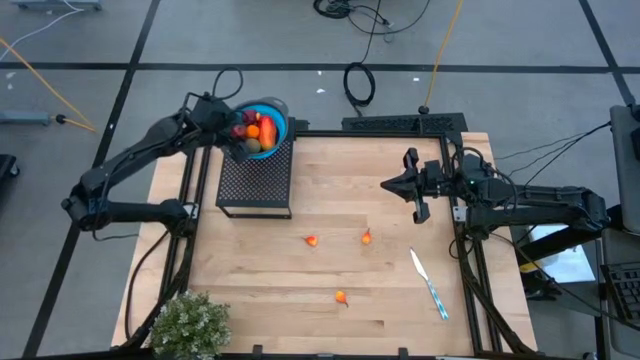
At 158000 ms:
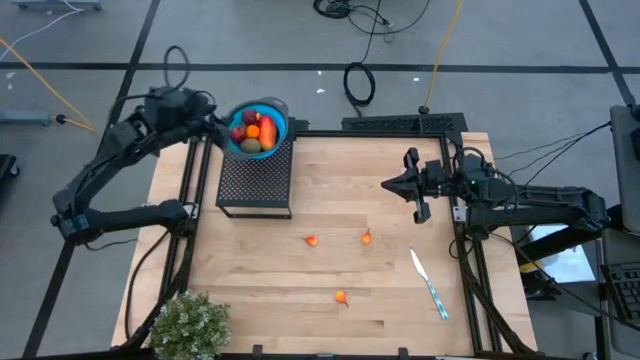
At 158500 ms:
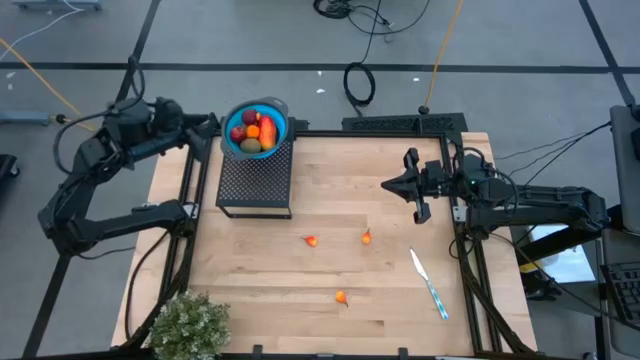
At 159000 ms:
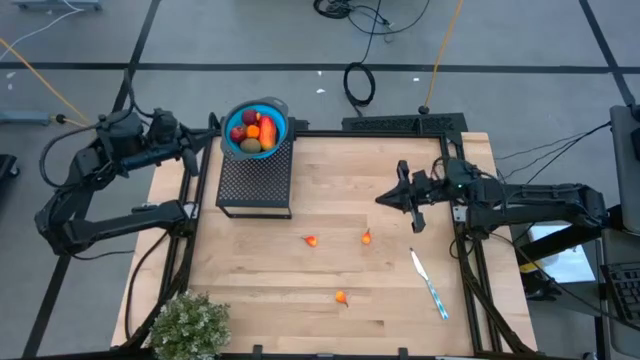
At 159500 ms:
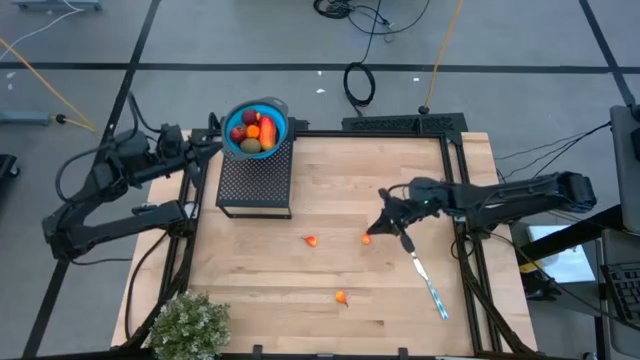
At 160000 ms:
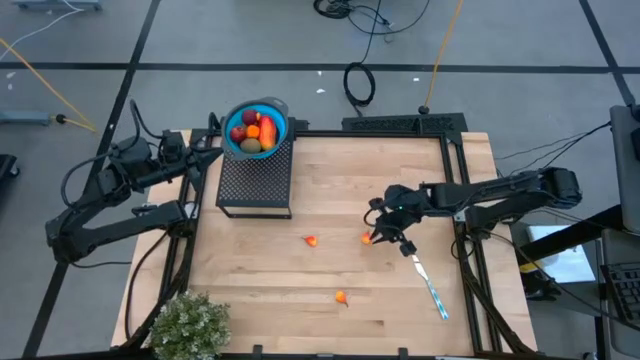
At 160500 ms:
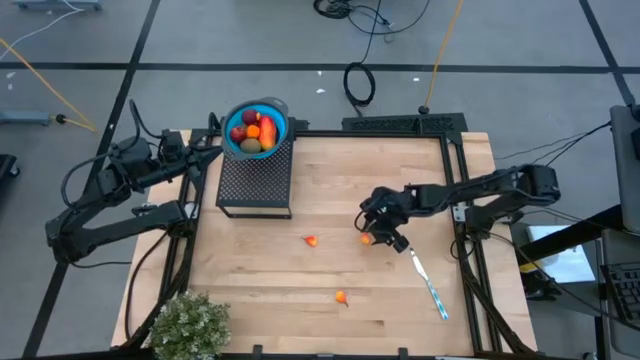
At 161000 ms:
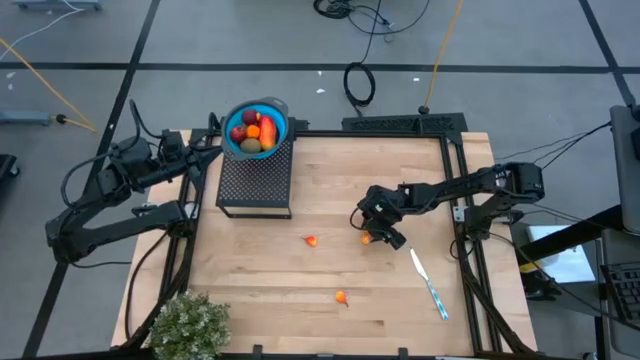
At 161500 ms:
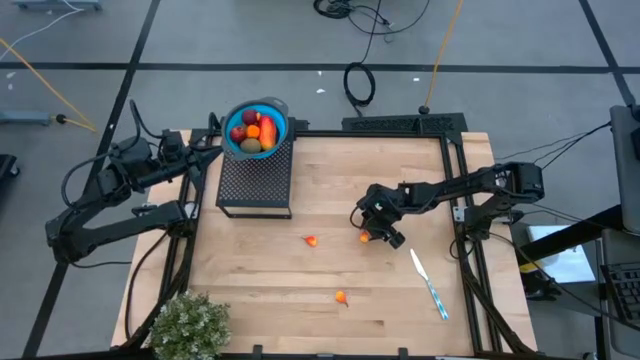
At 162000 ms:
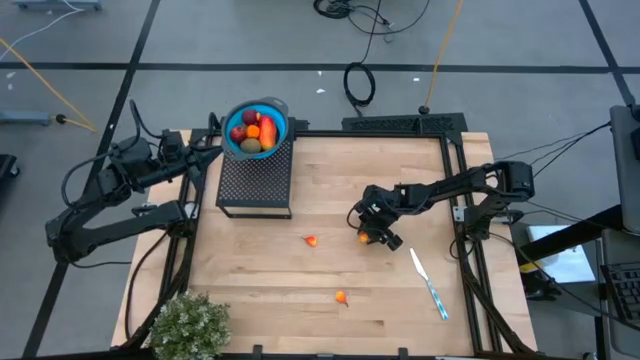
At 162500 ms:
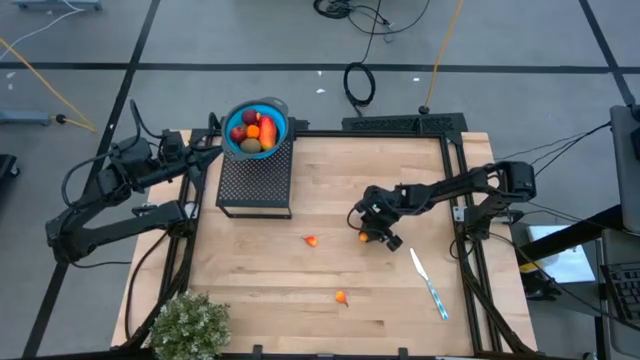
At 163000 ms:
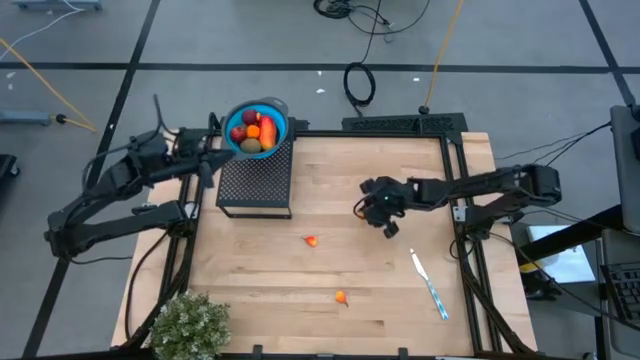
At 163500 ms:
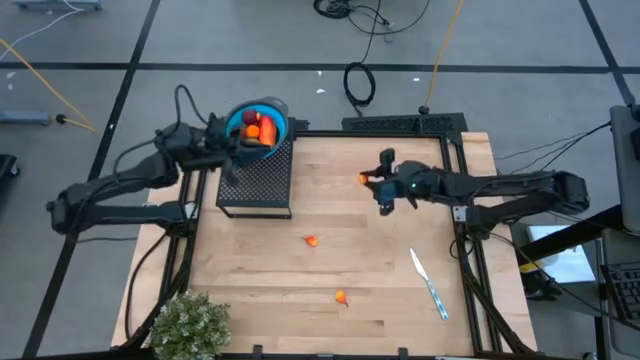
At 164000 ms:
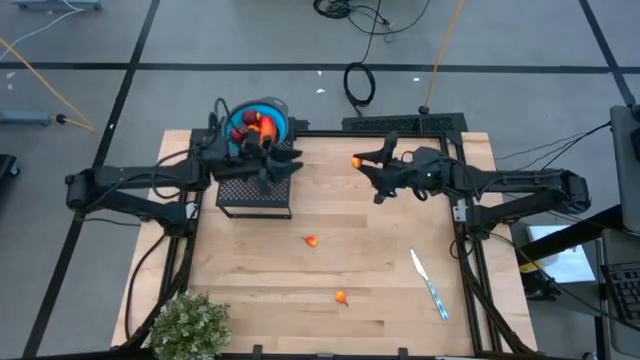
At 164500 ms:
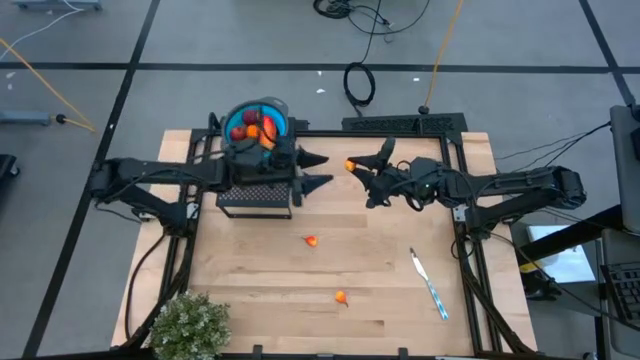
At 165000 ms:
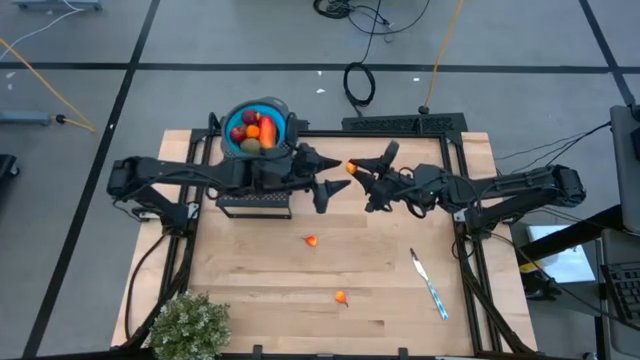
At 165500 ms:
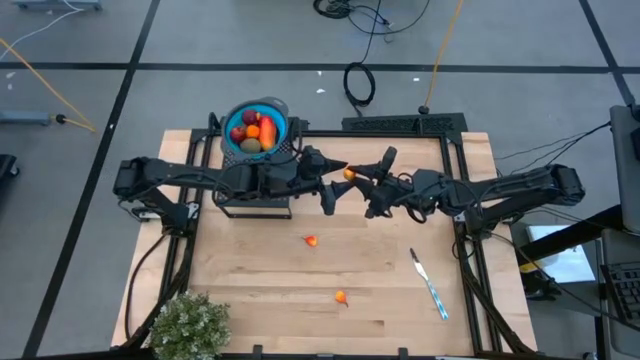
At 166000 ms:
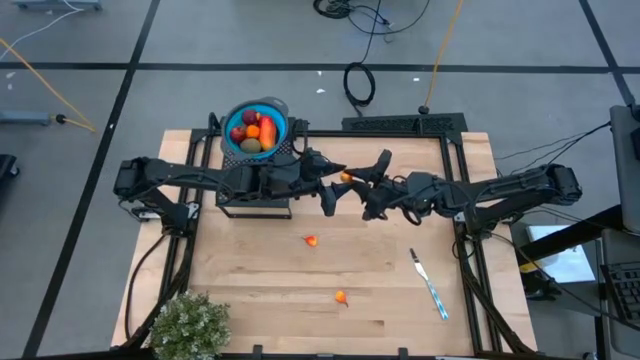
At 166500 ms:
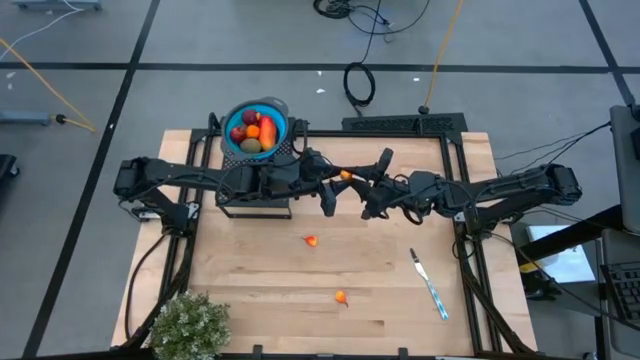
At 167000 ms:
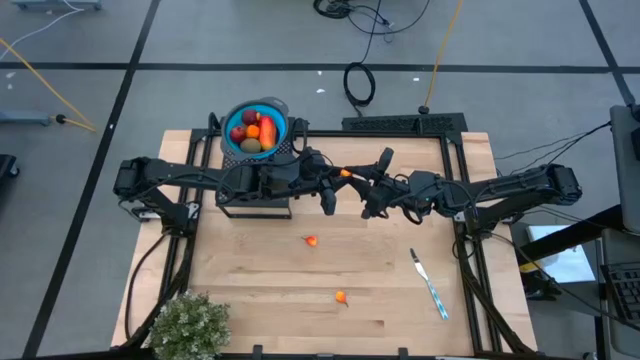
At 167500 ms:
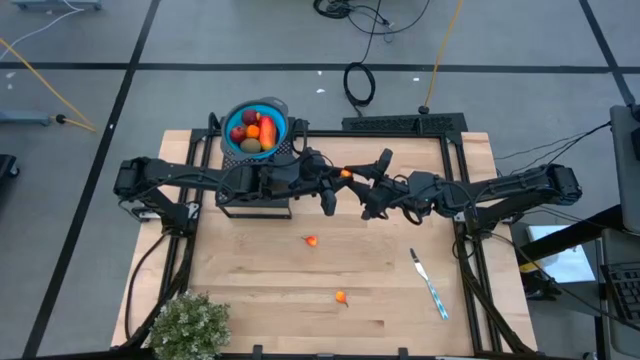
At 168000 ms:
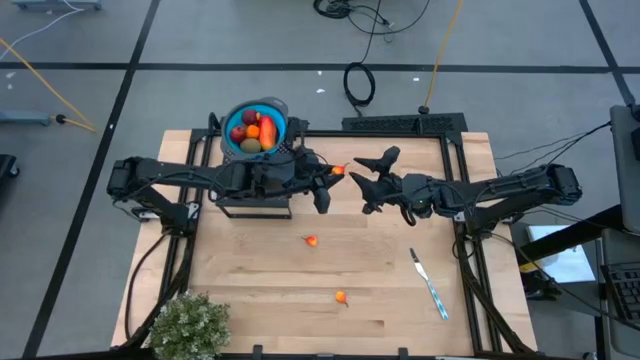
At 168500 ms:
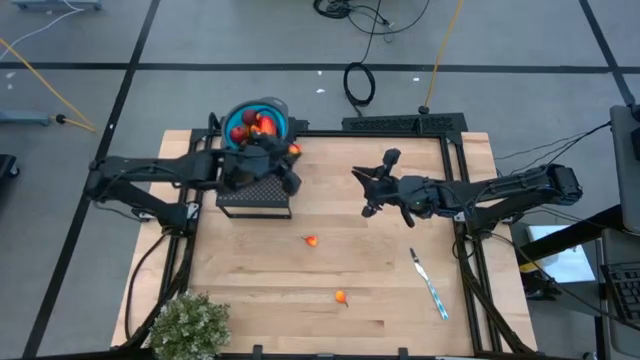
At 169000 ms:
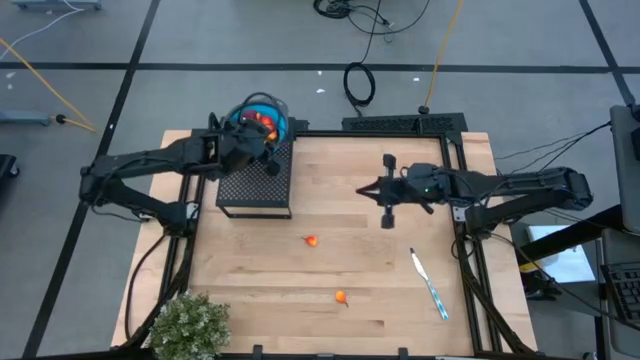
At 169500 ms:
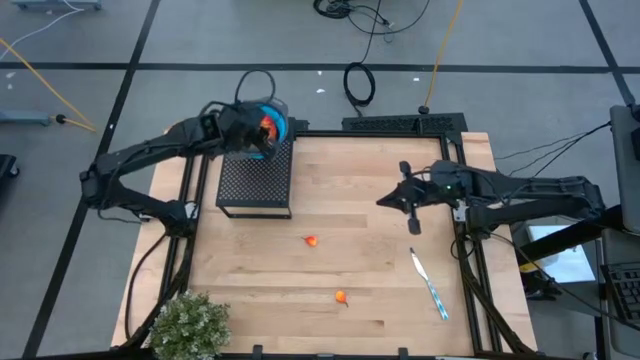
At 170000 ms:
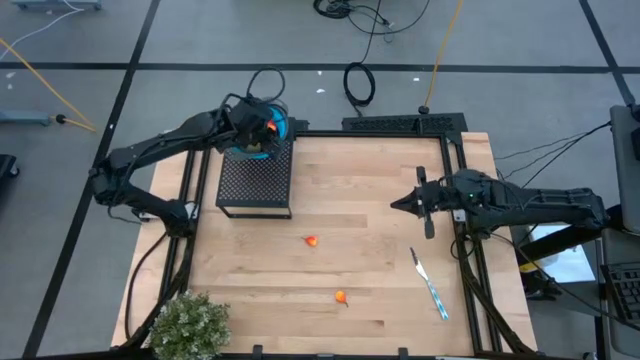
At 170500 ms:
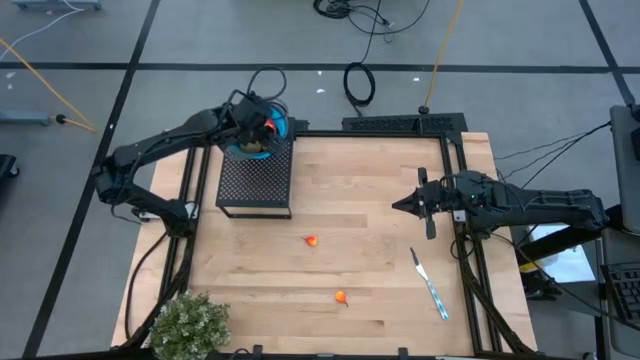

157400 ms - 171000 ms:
Task: Pick & Place Fruit
Put the peach into the blue strainer bowl on the shelf
